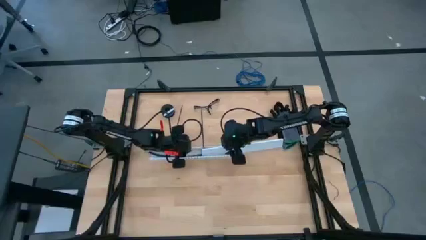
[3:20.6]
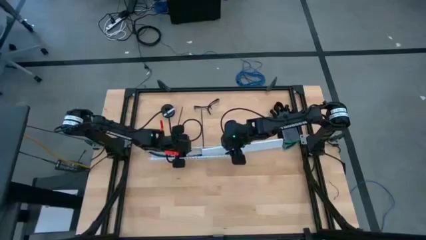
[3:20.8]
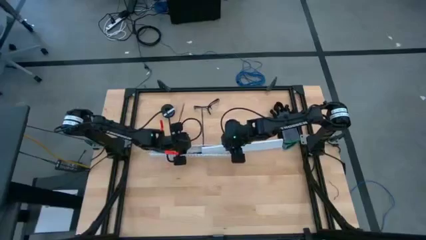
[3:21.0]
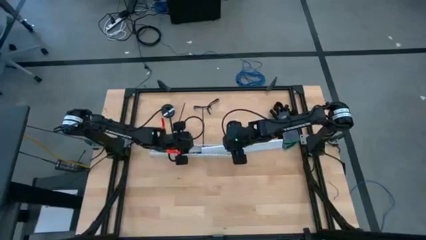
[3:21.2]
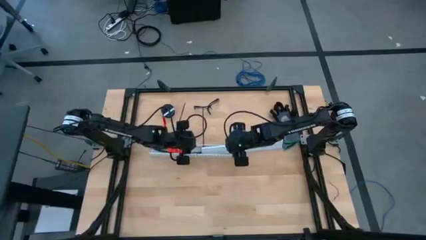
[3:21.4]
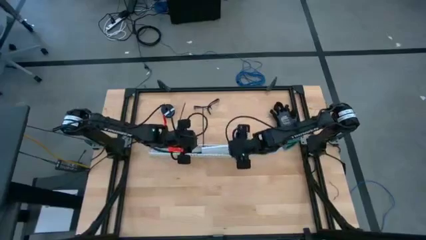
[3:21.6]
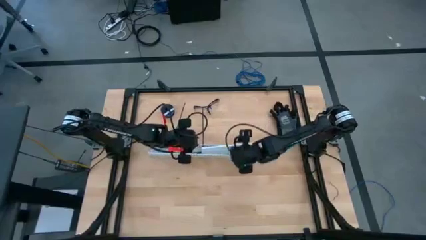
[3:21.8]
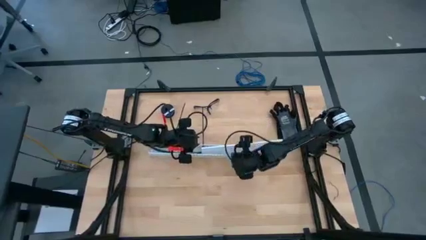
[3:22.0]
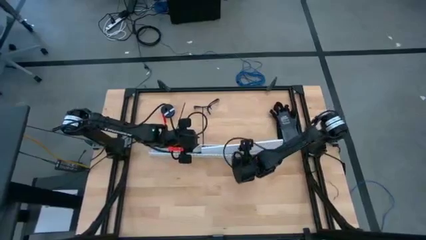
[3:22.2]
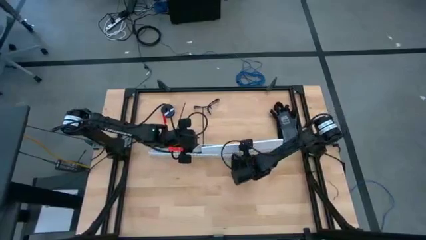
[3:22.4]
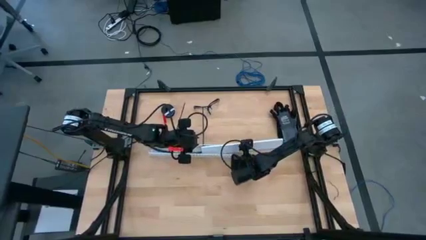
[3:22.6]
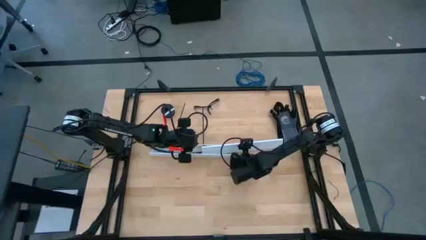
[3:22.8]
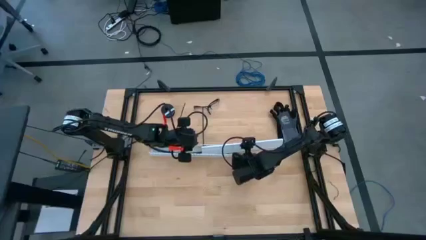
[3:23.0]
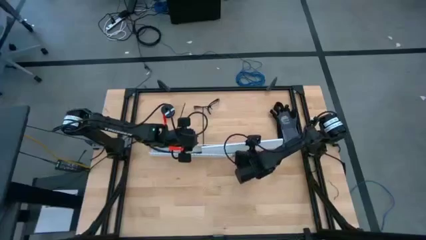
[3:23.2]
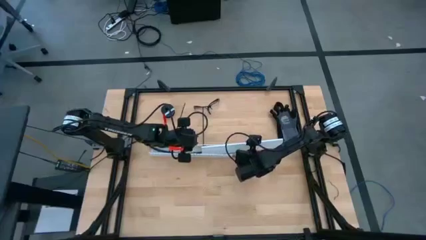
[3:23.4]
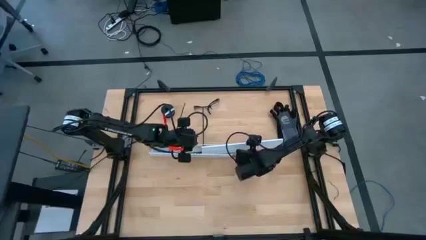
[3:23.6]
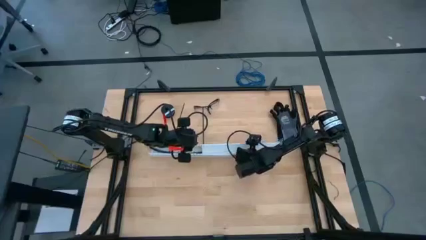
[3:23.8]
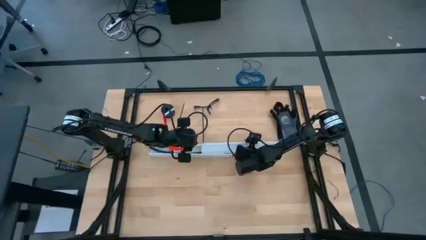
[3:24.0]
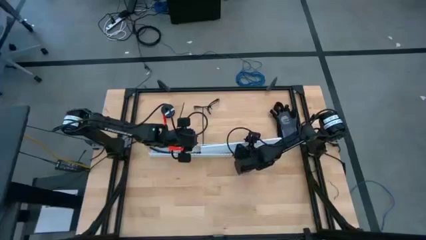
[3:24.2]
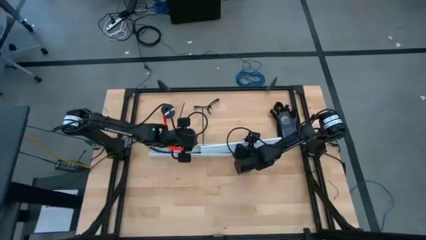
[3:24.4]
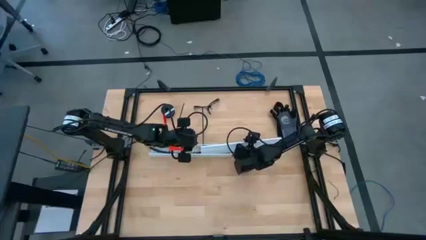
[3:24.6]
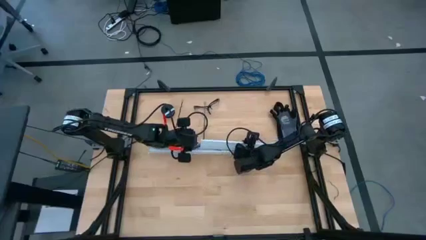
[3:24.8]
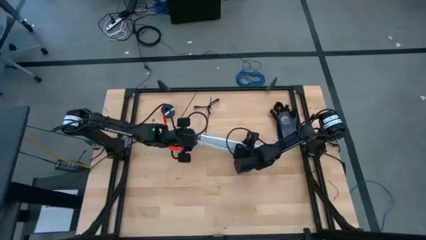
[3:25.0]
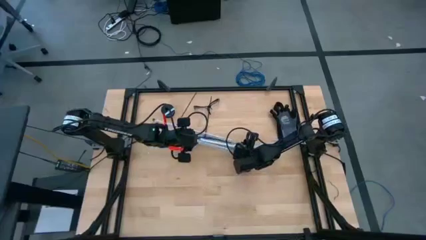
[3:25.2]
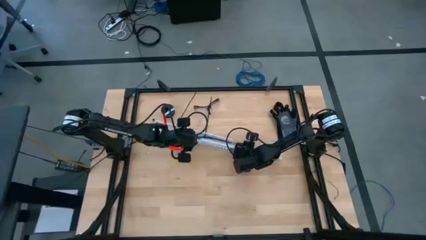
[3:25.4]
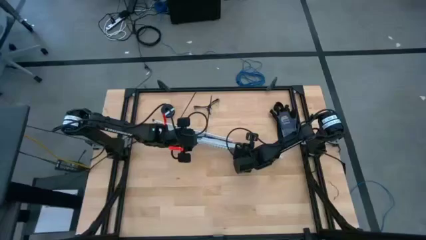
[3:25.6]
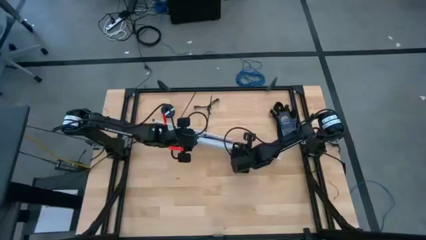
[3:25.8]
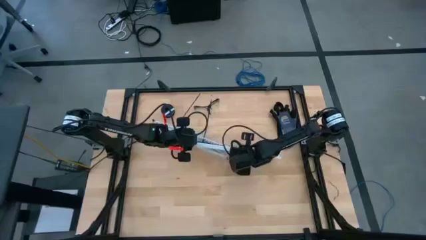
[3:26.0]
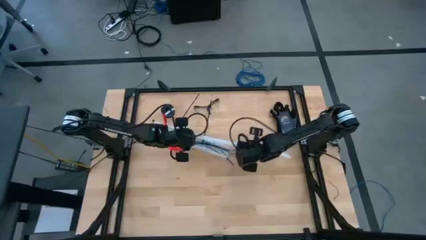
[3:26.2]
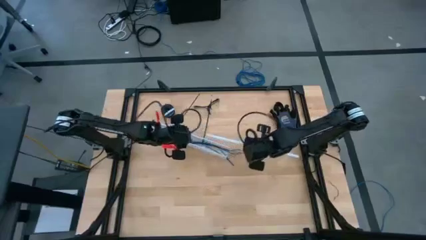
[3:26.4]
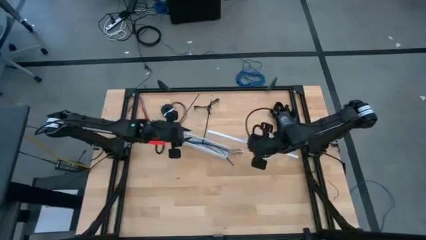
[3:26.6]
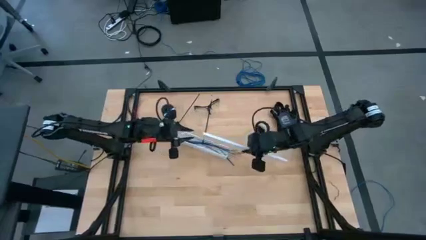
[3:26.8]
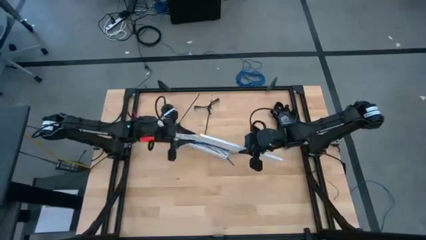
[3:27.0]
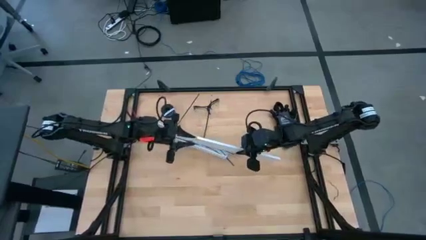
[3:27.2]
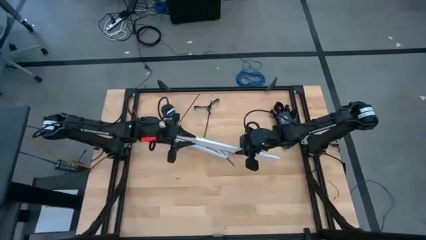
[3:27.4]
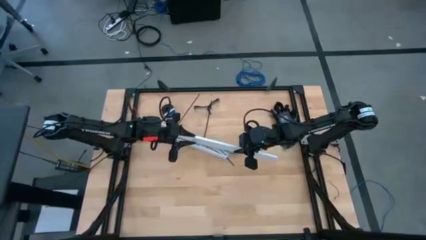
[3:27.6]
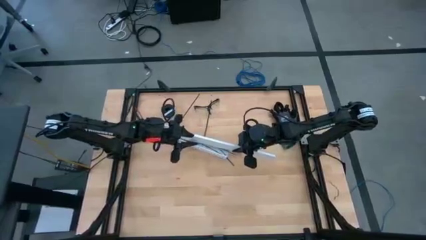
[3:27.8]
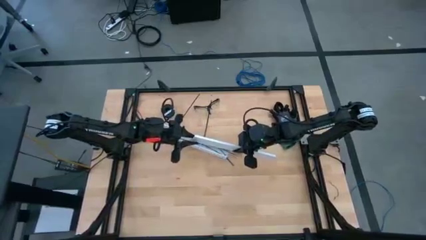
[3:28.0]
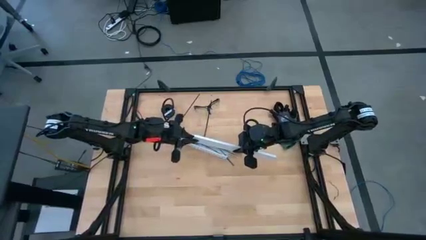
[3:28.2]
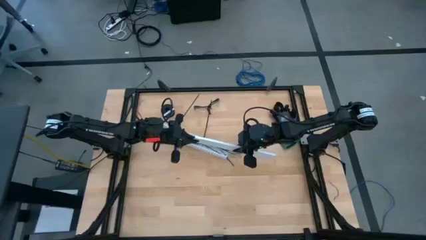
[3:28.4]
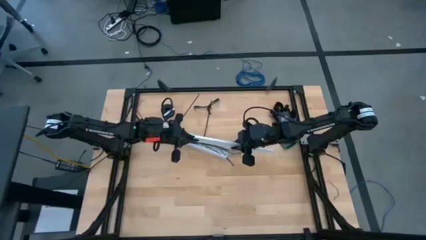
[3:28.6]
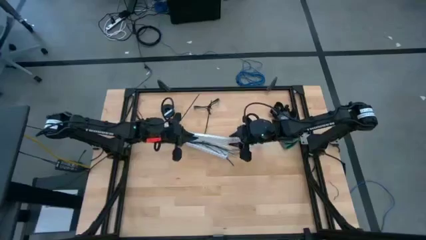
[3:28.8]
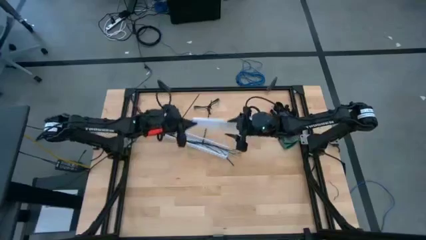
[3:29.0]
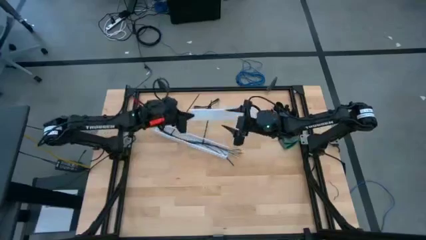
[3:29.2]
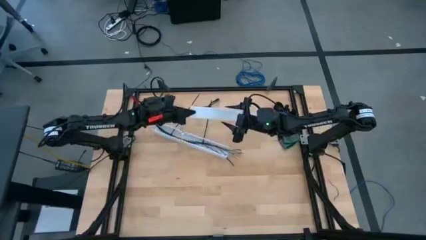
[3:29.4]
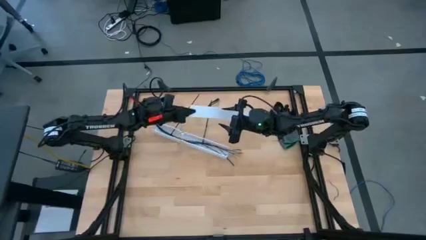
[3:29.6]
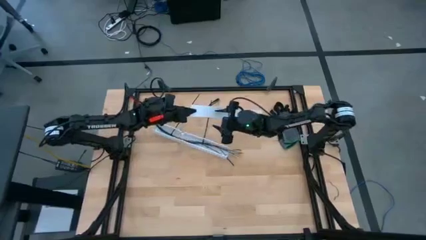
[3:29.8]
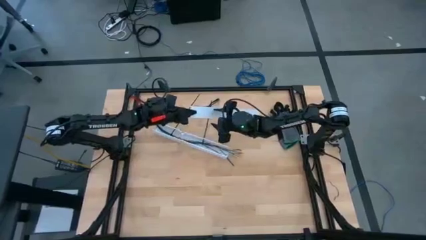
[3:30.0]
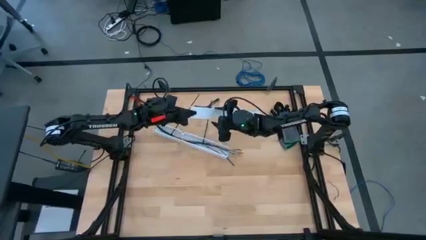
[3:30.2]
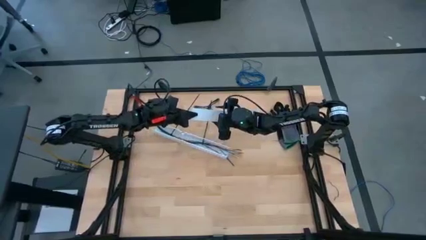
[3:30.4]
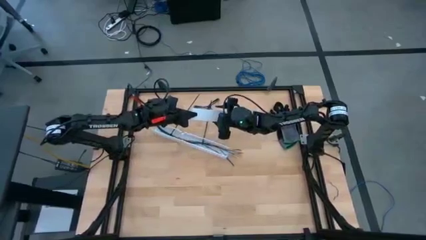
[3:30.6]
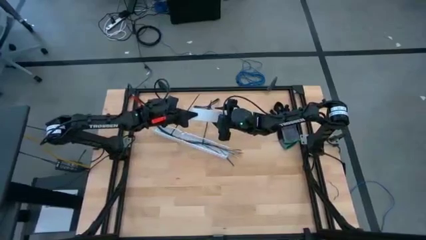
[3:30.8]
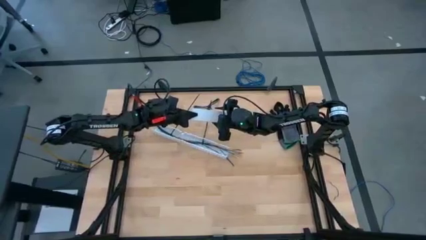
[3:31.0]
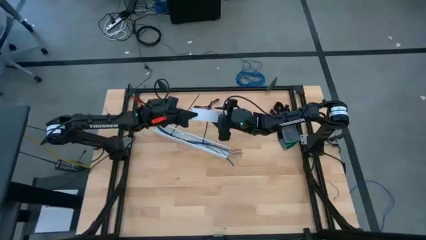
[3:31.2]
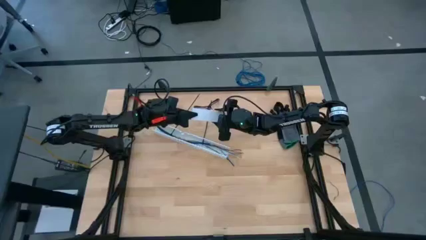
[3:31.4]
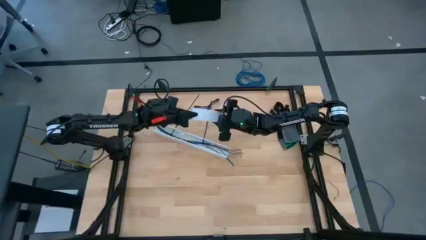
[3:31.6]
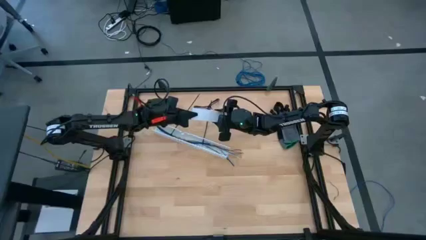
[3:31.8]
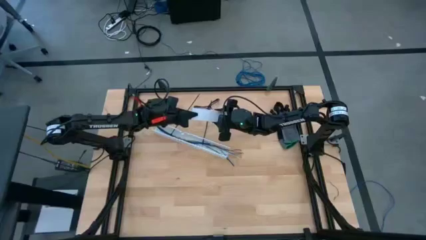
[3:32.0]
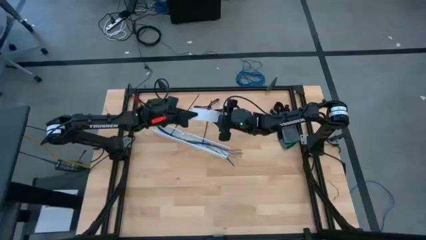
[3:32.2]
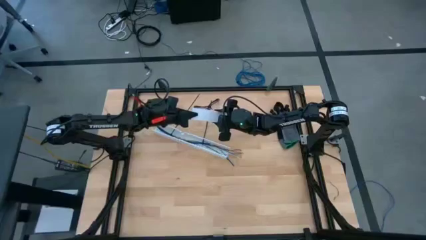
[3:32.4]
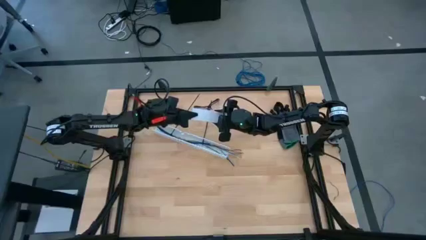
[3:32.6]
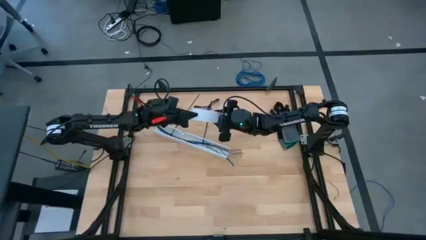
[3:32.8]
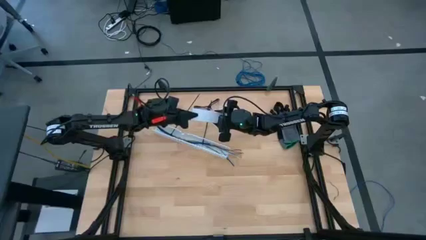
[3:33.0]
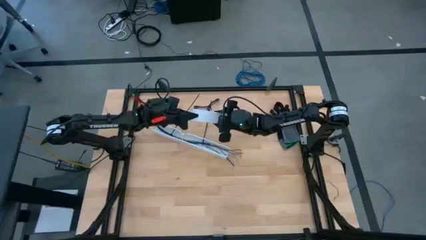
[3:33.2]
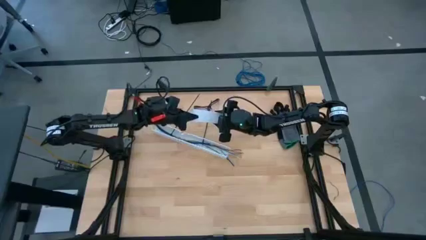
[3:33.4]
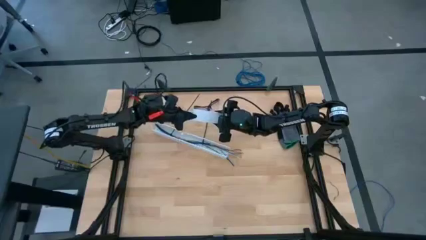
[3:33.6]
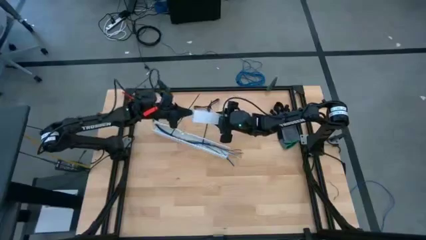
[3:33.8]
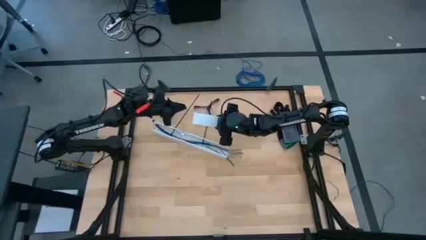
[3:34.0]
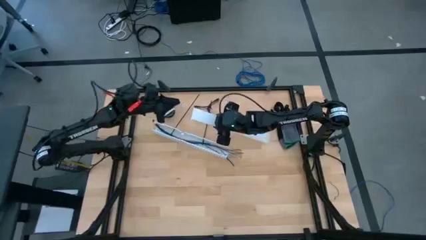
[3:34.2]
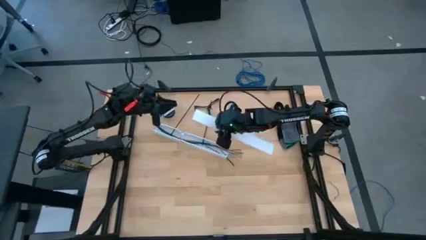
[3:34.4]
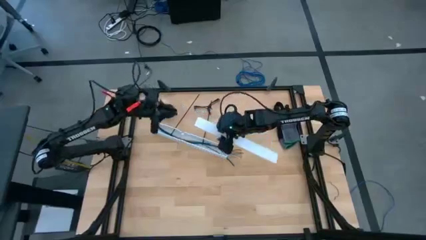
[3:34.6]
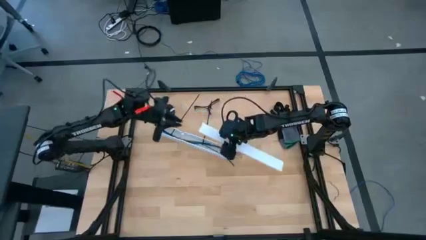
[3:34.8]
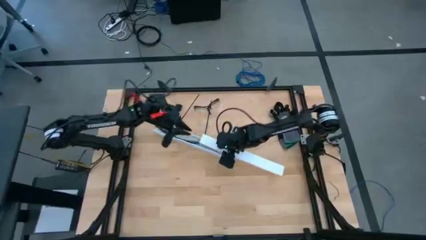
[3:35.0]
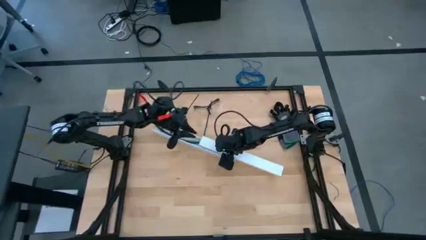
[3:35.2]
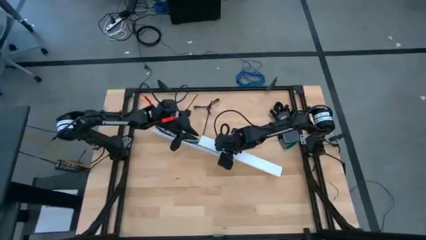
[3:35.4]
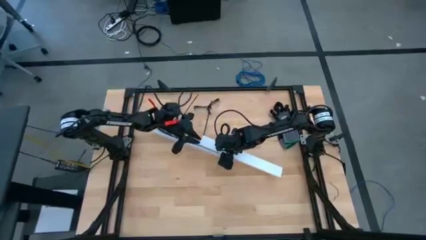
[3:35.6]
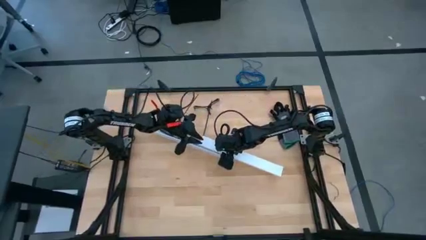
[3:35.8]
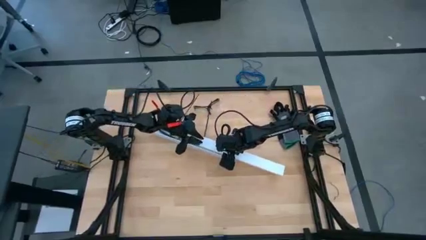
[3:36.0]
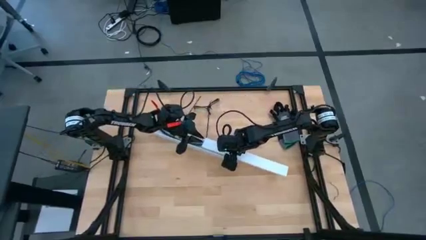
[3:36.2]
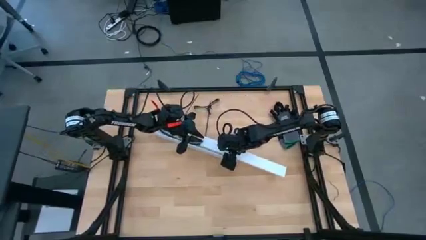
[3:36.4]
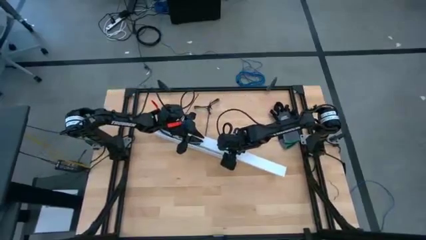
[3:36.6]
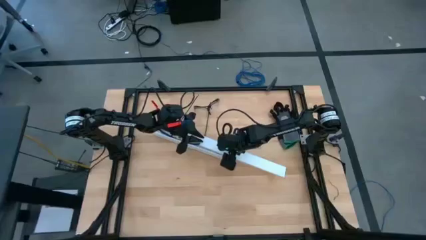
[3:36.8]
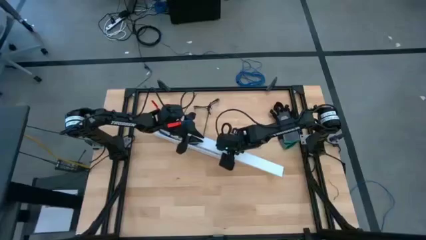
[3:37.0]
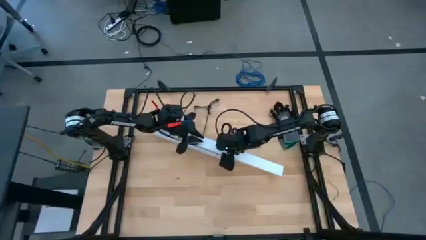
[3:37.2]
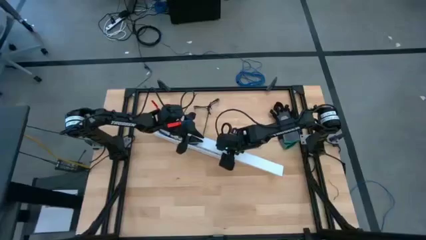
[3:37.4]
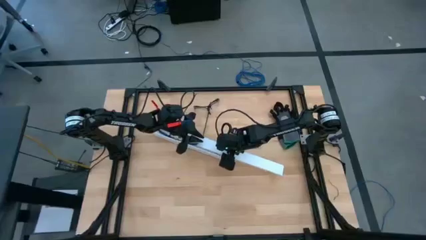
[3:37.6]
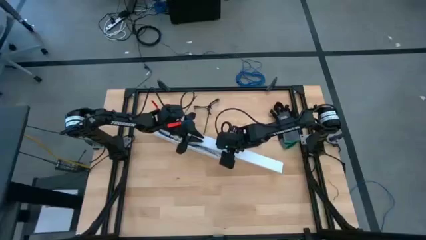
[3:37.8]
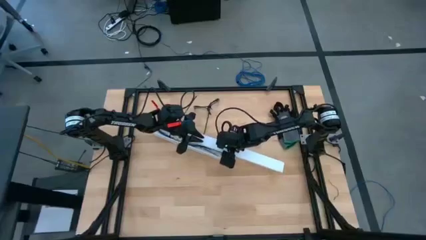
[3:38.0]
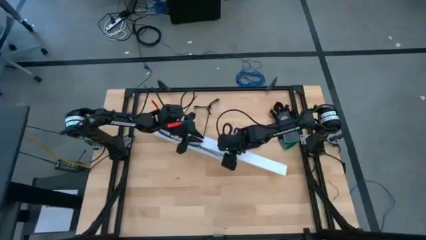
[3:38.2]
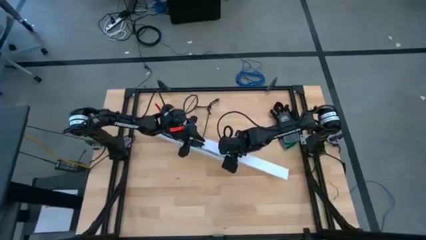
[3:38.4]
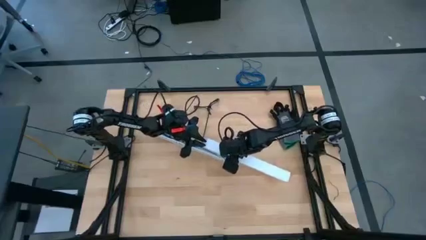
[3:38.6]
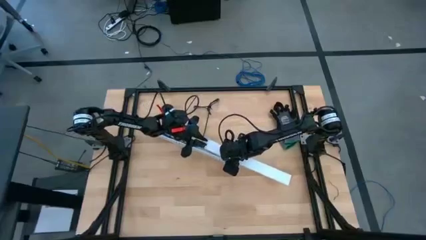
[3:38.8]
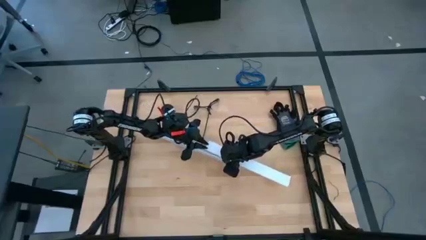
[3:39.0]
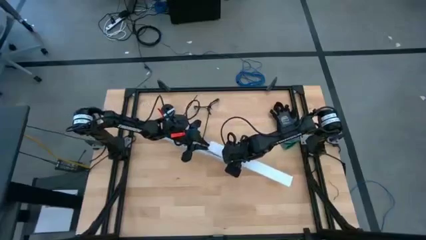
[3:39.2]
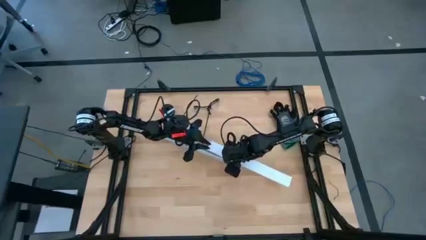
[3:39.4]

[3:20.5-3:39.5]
Task: Ziptie cables
Close the white cable duct
